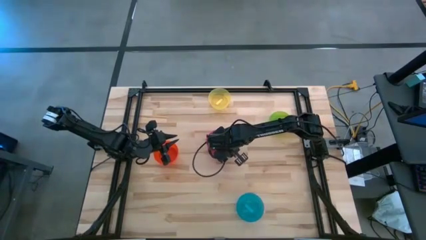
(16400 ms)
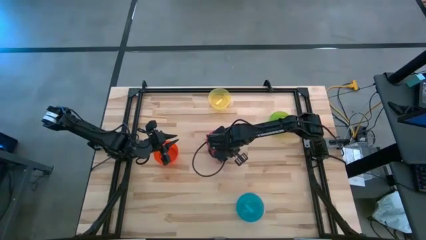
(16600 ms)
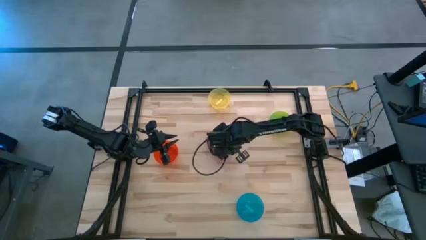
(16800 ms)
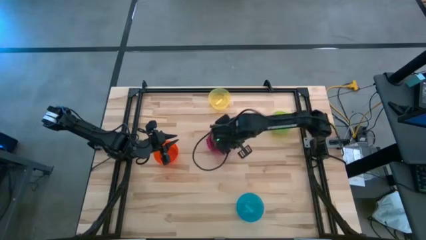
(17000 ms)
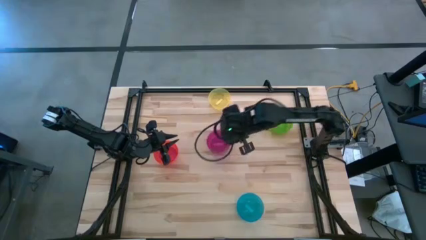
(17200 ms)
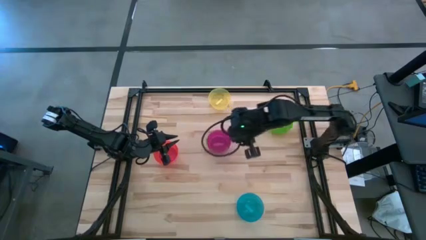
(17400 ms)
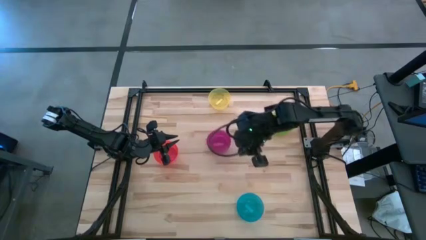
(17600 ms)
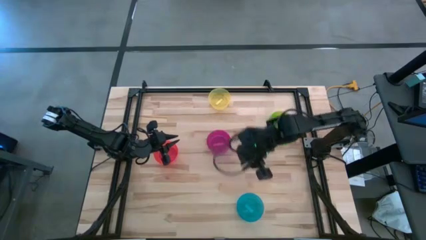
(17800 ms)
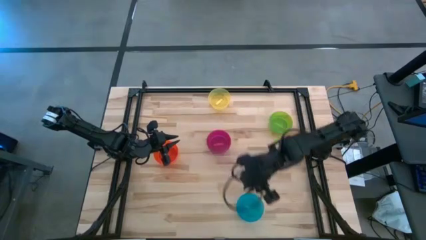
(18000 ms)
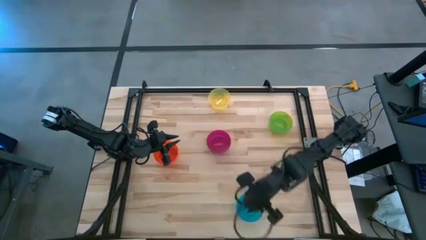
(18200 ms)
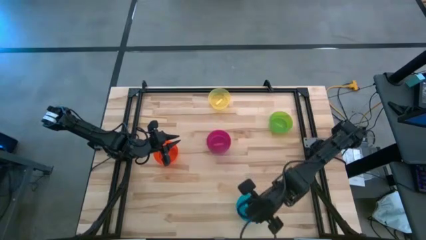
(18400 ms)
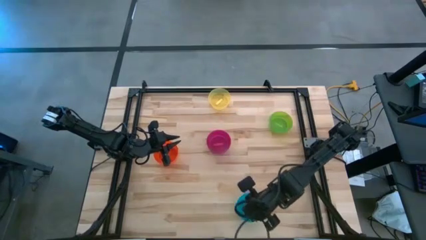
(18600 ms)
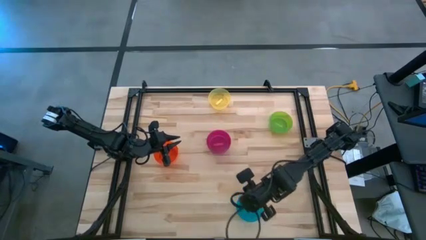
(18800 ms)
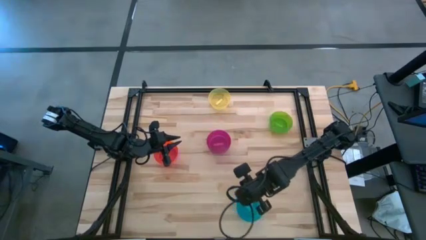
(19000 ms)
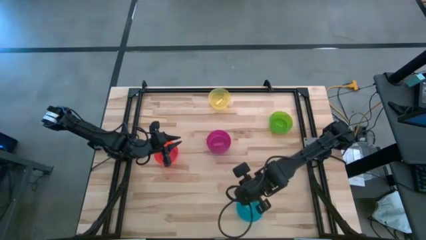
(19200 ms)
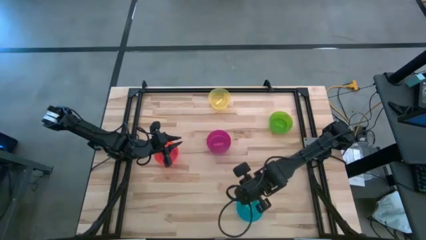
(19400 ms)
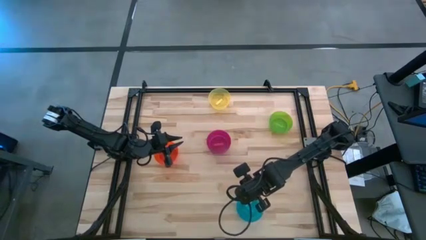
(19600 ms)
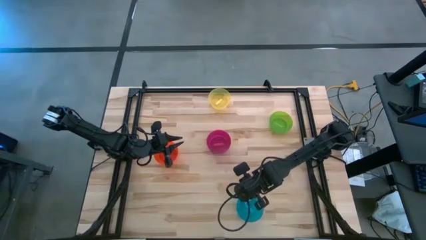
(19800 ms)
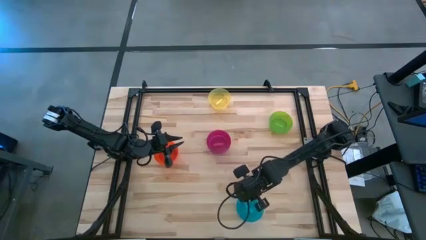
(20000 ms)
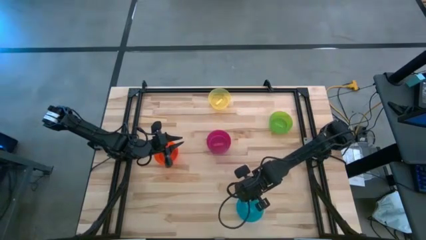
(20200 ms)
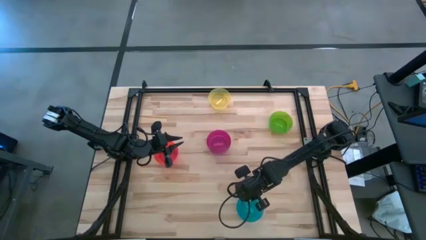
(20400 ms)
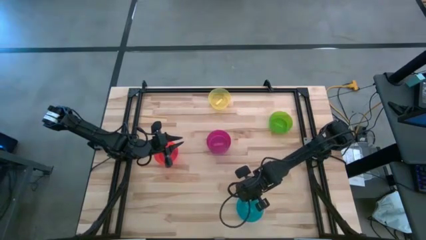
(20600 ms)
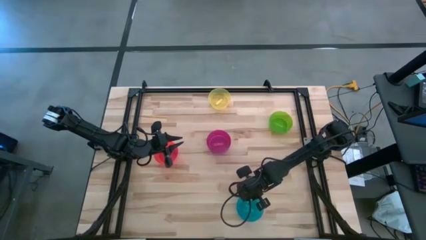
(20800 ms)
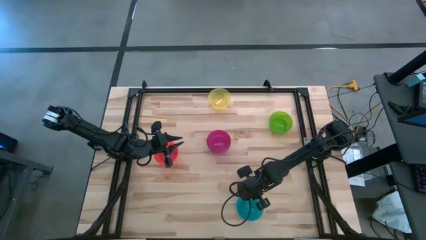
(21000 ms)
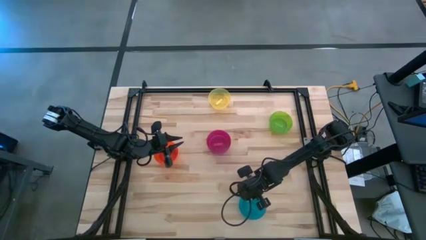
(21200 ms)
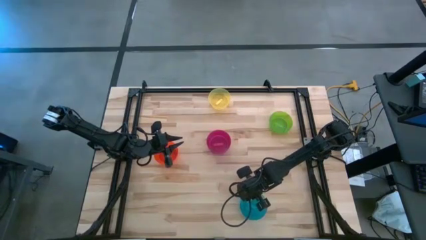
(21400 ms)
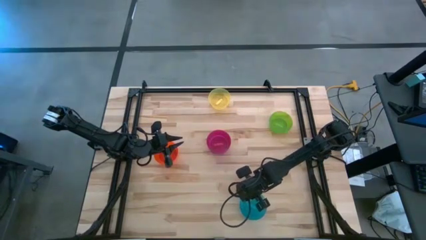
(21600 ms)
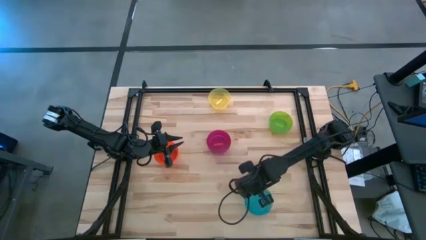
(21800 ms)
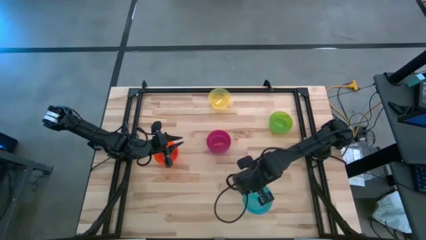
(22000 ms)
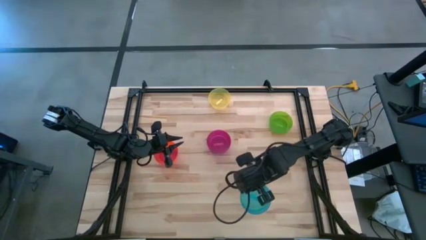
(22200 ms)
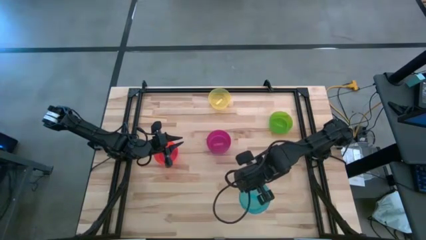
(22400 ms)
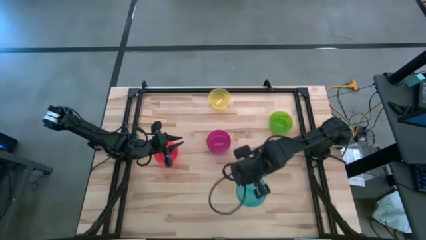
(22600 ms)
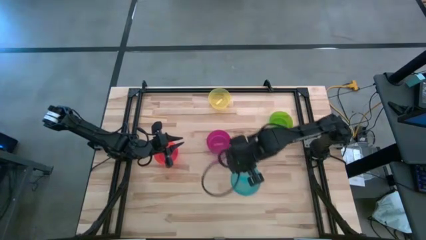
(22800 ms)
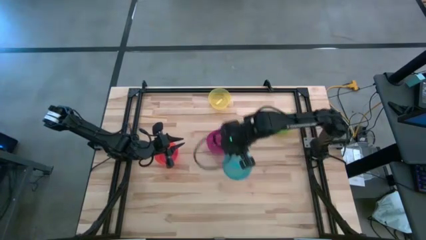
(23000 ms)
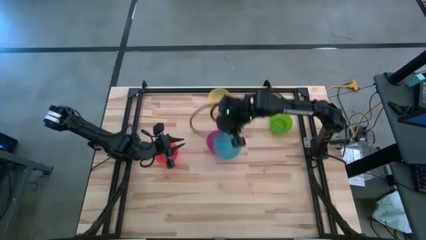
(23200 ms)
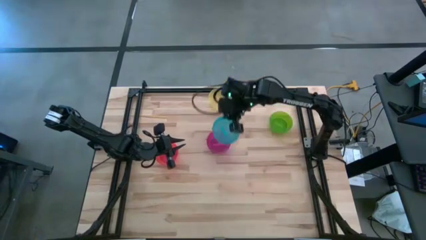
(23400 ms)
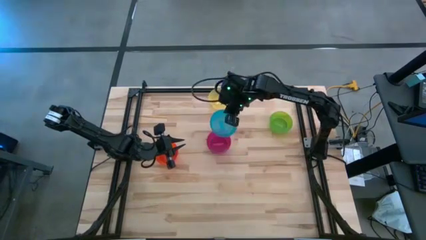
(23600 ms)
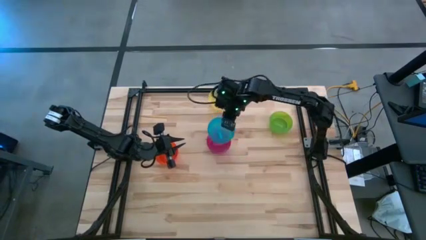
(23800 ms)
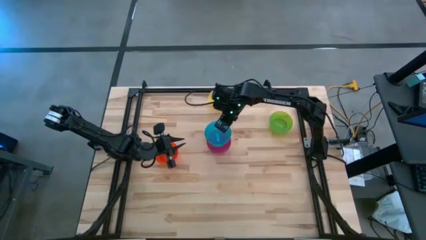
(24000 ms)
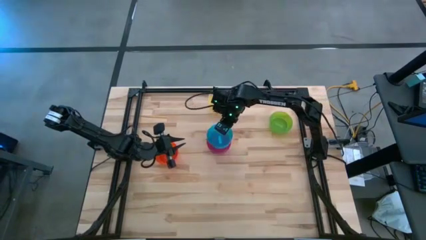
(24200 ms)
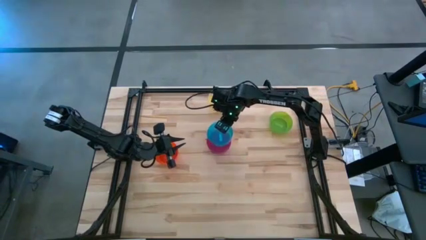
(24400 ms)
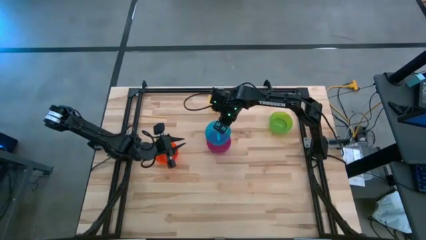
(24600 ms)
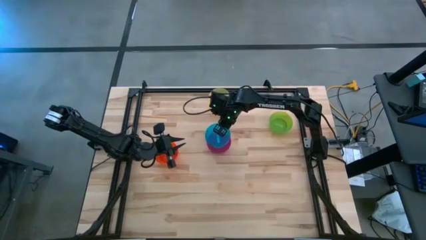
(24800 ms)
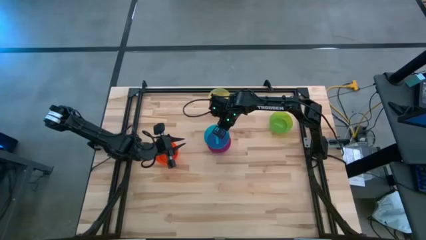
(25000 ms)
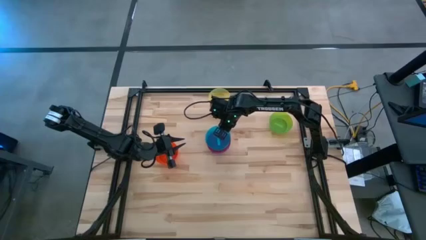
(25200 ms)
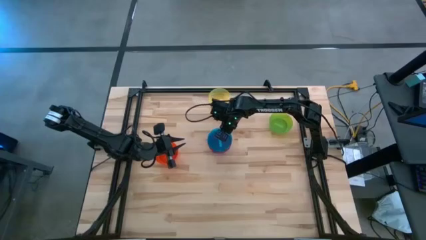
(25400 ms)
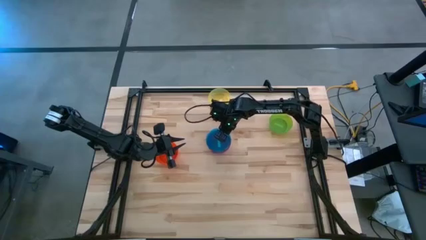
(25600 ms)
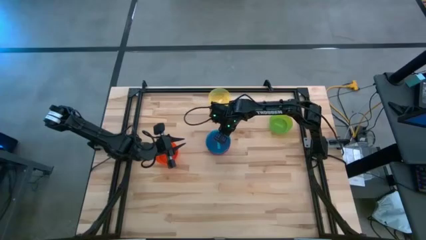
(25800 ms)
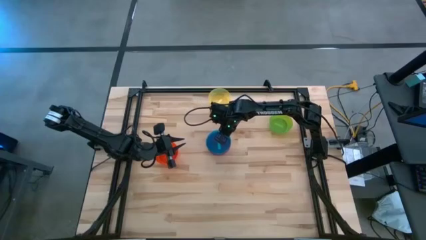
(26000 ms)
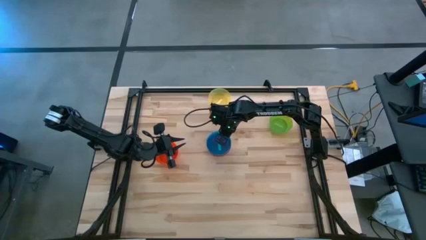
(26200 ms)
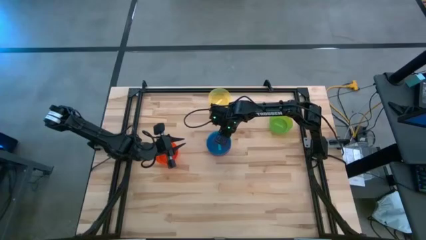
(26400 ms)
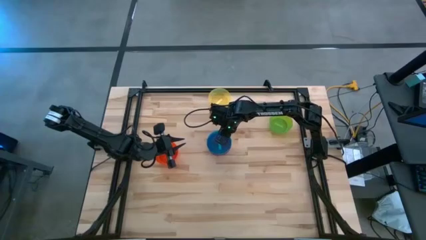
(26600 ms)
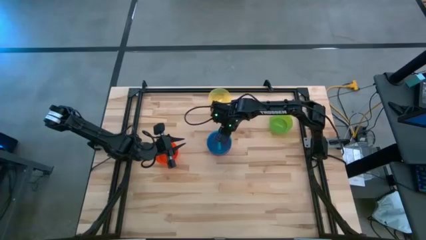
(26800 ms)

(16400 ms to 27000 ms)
Task: Nest bowls inside each other
Stack the blue bowl on top of the pink bowl

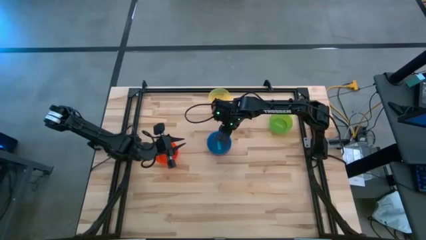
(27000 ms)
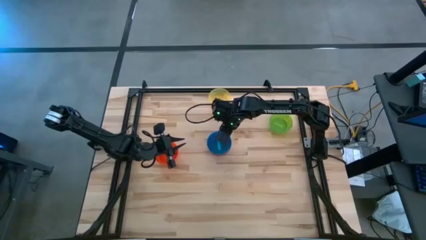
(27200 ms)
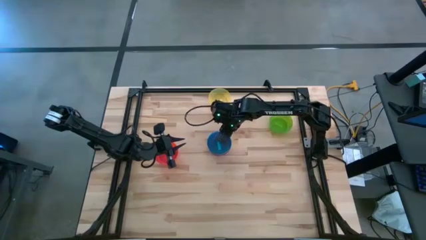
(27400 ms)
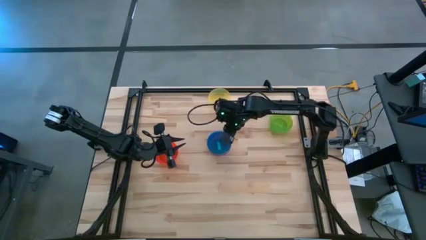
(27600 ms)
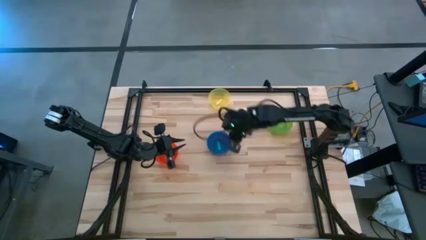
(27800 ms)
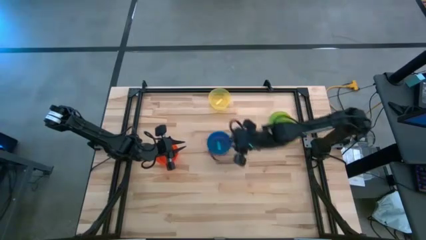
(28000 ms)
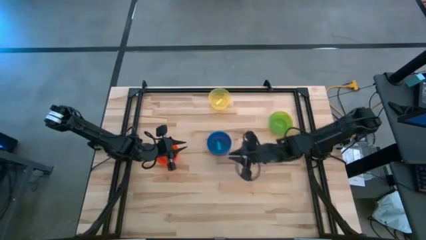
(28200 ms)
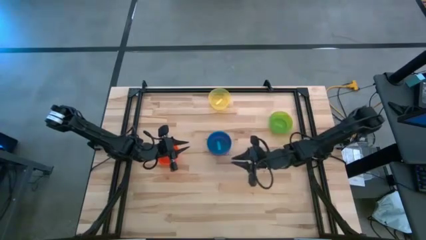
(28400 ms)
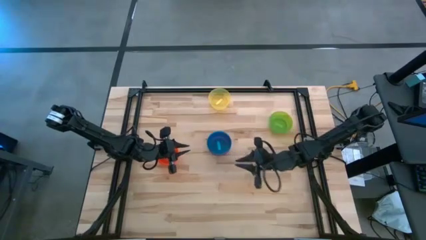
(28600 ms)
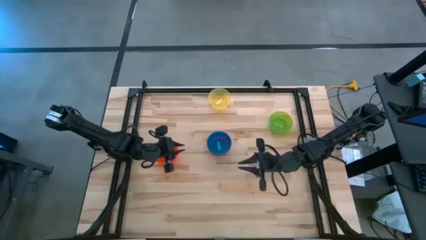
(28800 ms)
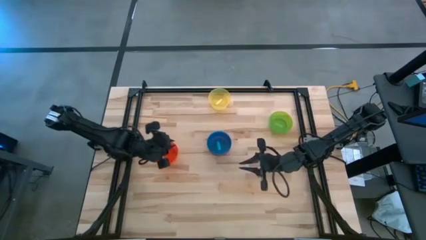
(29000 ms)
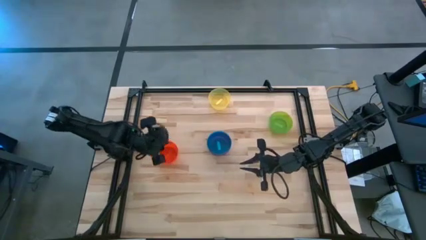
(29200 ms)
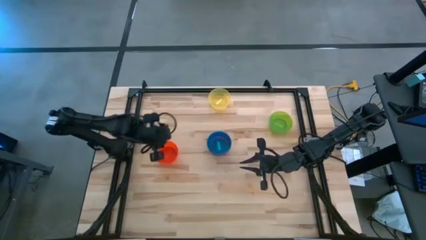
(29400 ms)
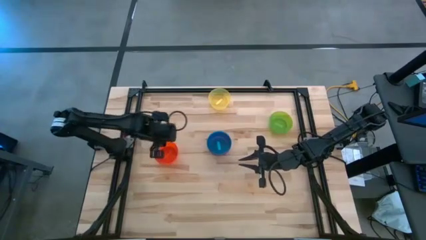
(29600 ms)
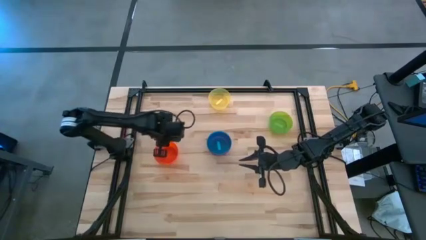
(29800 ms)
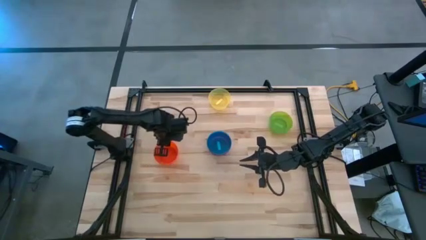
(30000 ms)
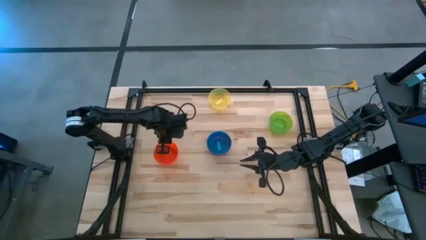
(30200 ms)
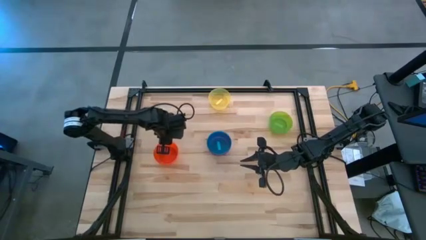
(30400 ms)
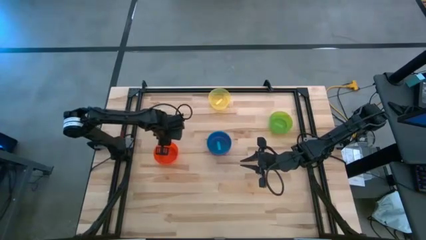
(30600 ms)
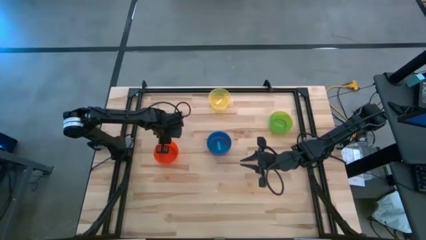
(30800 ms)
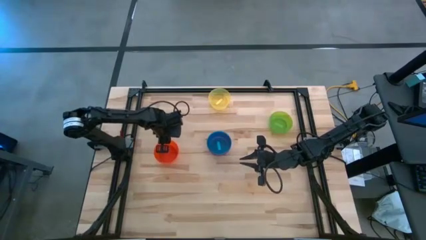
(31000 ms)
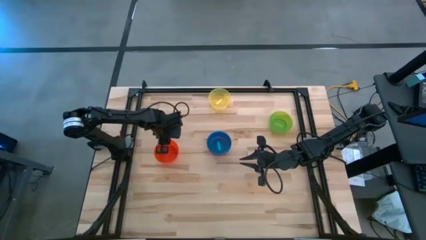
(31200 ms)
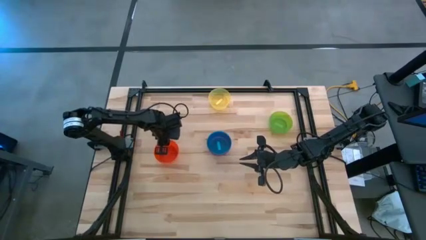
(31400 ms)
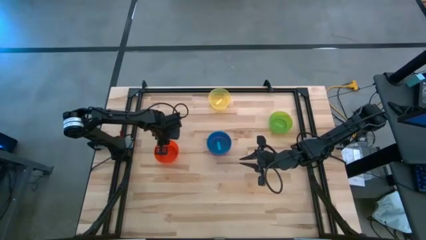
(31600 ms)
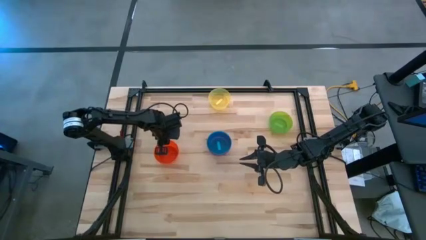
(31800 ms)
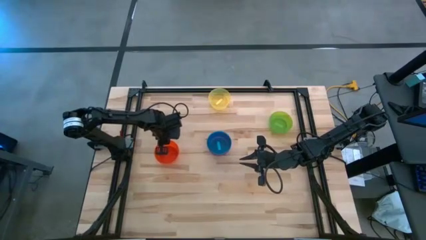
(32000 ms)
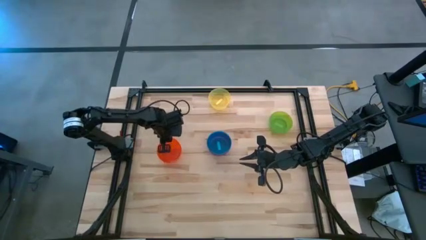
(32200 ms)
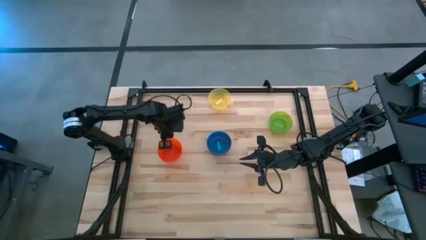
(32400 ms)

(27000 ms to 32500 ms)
Stack the orange bowl on top of the blue bowl
